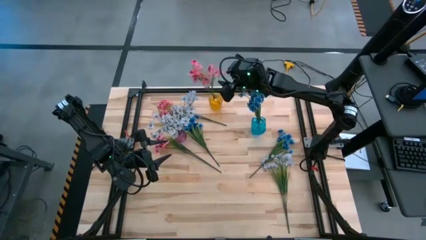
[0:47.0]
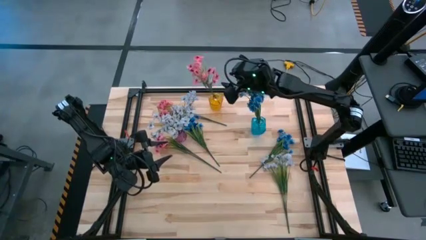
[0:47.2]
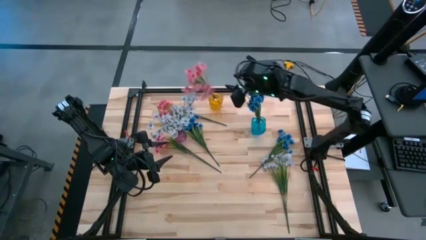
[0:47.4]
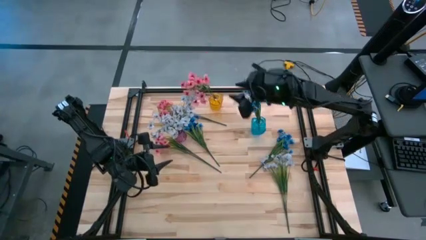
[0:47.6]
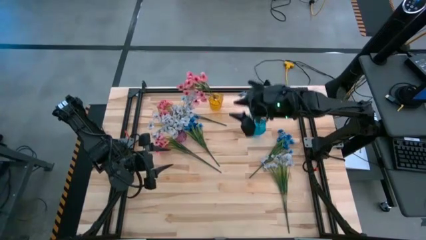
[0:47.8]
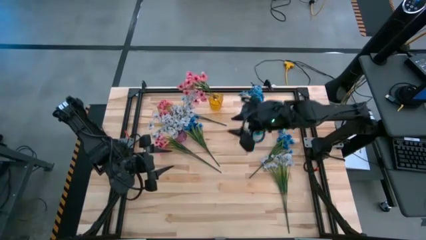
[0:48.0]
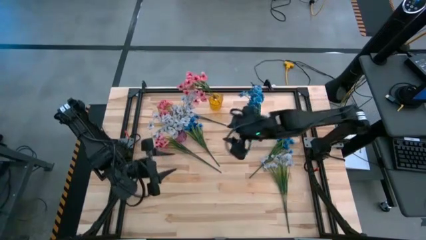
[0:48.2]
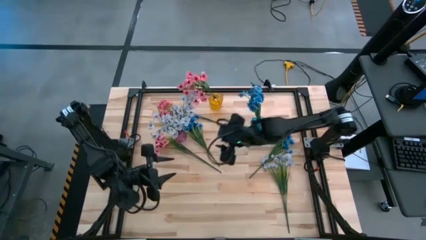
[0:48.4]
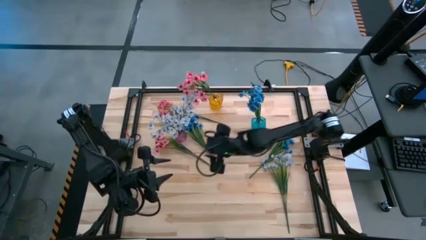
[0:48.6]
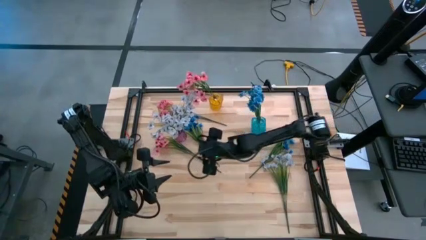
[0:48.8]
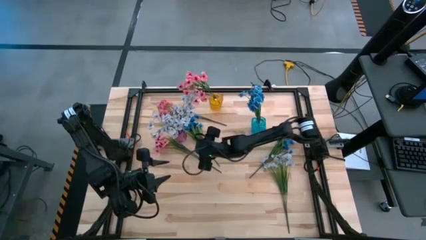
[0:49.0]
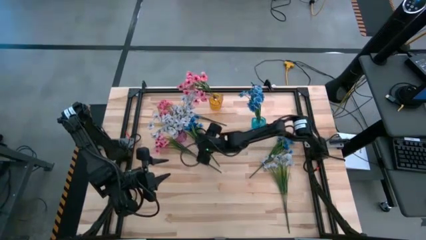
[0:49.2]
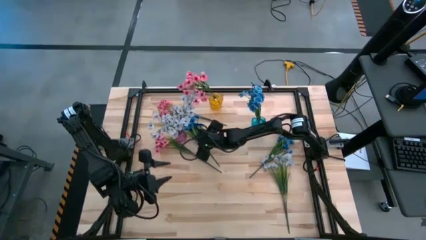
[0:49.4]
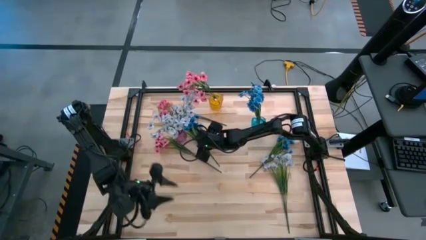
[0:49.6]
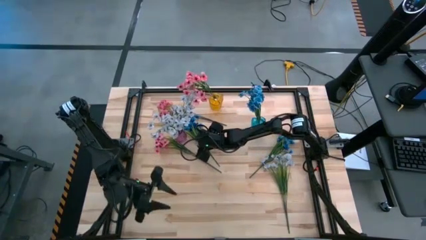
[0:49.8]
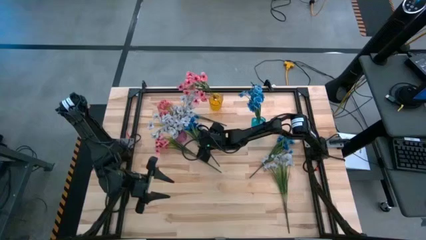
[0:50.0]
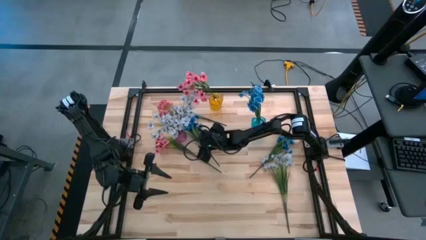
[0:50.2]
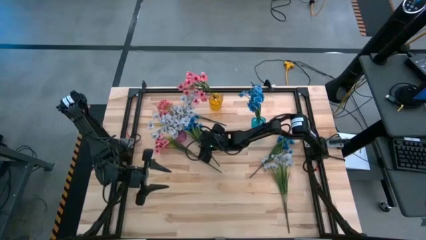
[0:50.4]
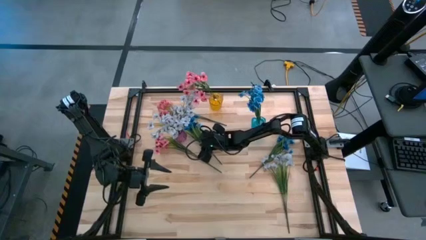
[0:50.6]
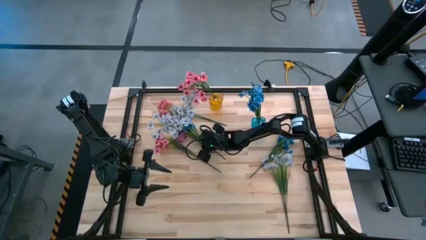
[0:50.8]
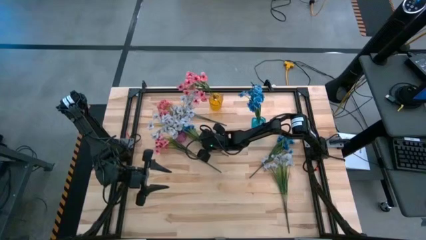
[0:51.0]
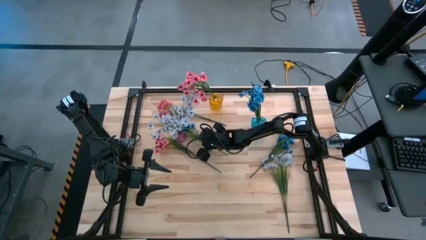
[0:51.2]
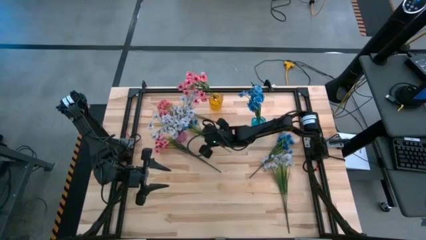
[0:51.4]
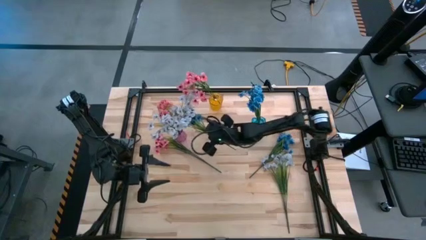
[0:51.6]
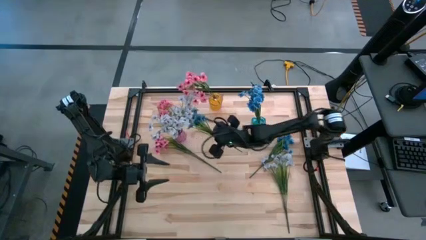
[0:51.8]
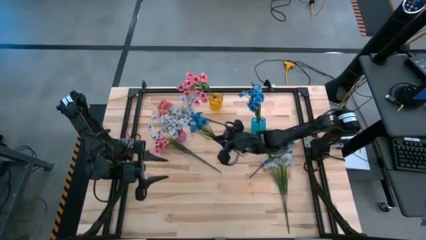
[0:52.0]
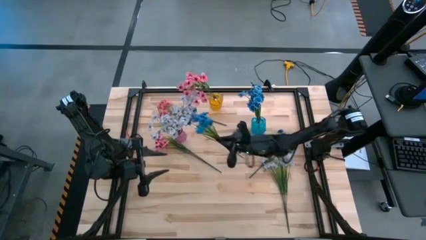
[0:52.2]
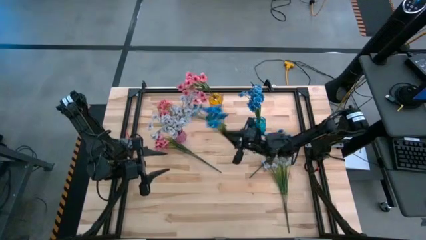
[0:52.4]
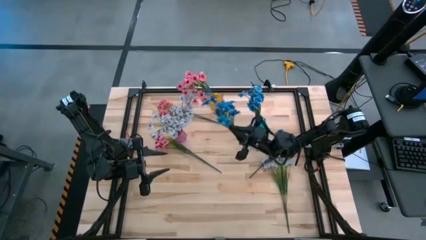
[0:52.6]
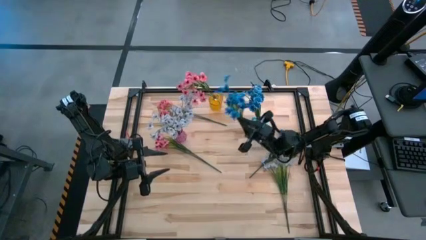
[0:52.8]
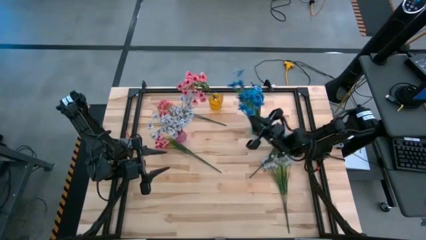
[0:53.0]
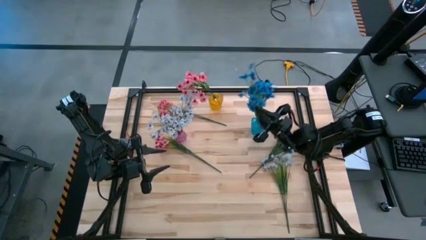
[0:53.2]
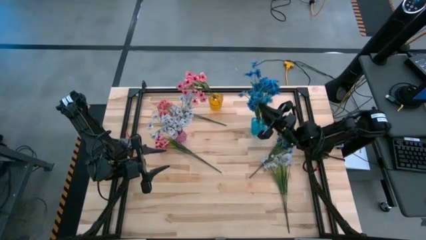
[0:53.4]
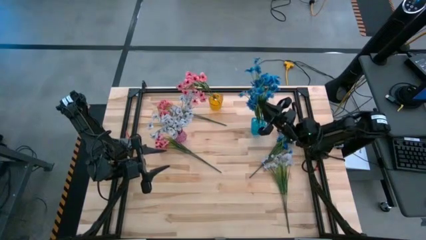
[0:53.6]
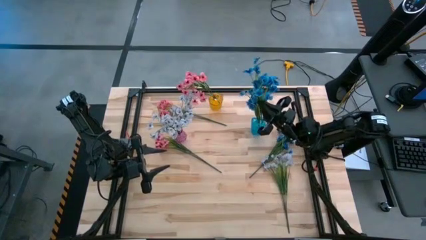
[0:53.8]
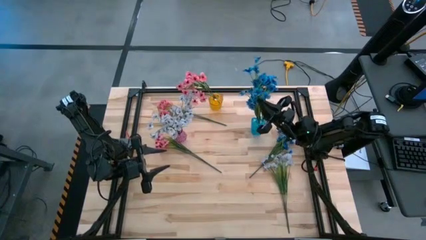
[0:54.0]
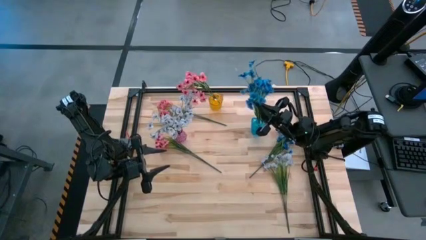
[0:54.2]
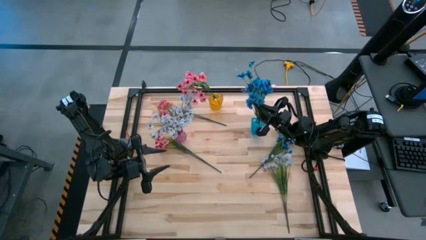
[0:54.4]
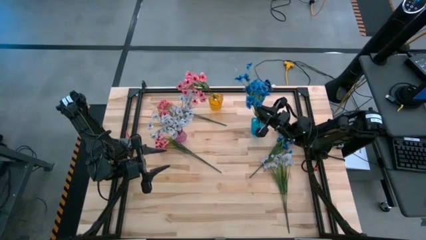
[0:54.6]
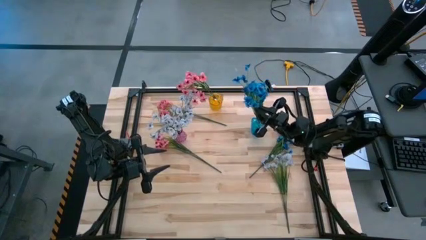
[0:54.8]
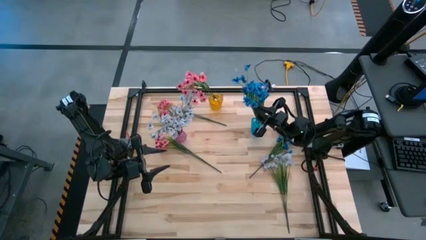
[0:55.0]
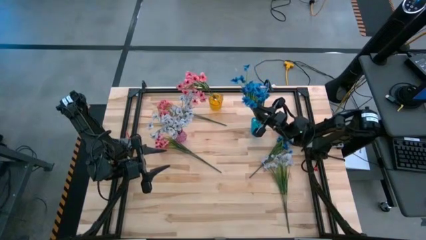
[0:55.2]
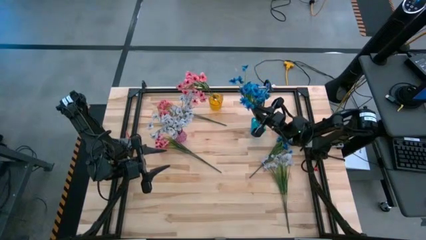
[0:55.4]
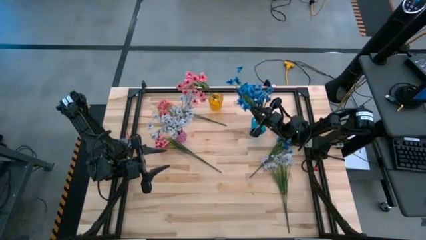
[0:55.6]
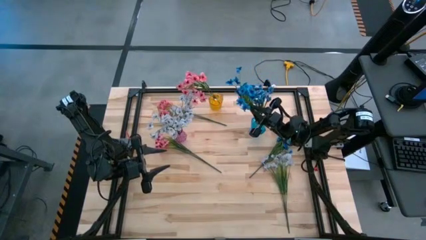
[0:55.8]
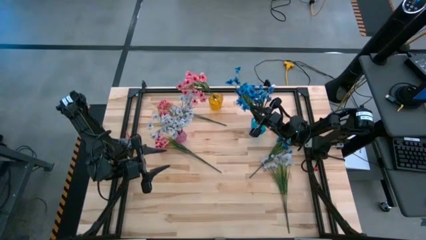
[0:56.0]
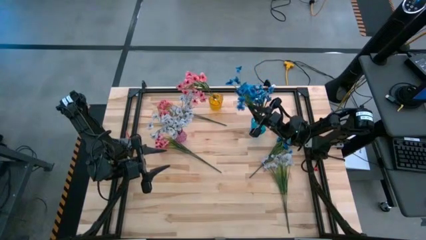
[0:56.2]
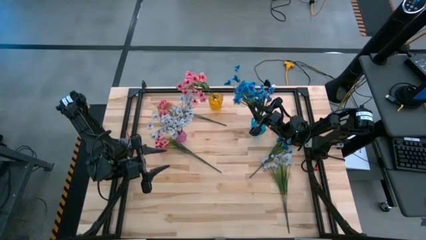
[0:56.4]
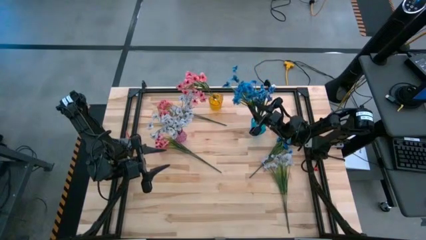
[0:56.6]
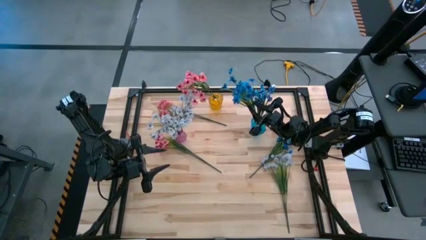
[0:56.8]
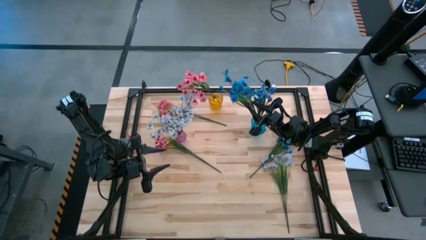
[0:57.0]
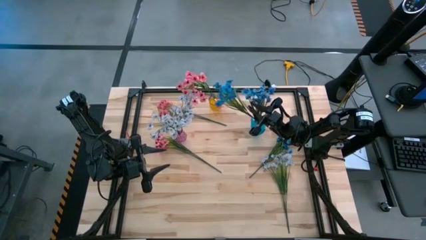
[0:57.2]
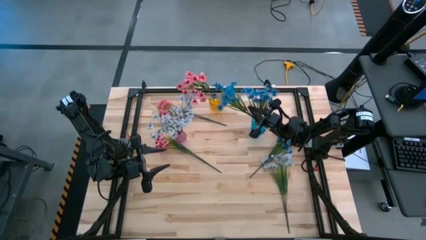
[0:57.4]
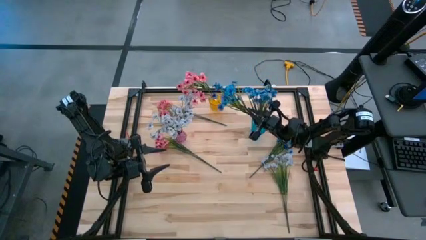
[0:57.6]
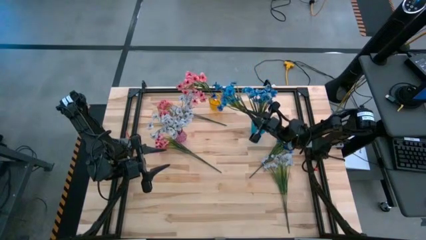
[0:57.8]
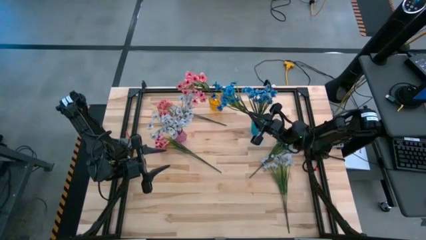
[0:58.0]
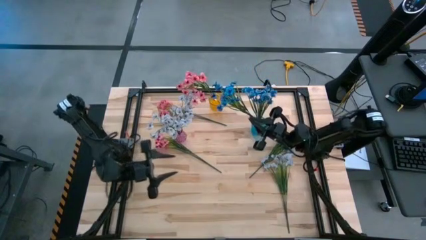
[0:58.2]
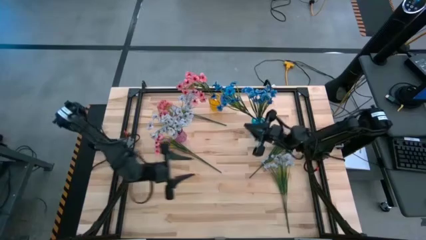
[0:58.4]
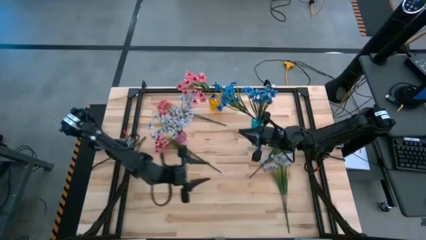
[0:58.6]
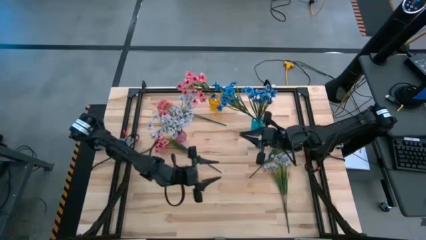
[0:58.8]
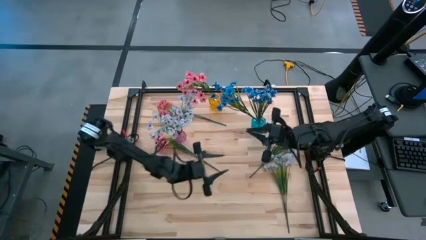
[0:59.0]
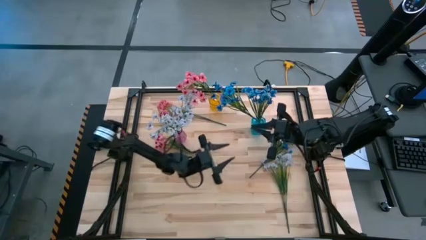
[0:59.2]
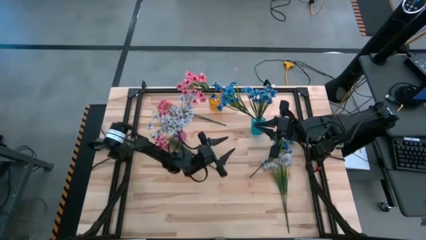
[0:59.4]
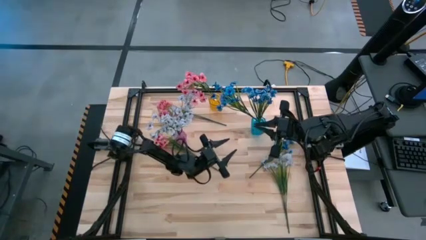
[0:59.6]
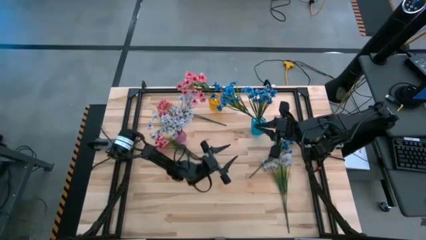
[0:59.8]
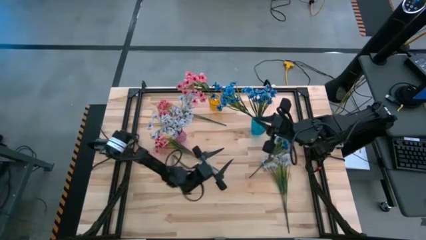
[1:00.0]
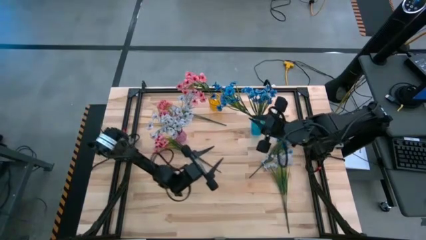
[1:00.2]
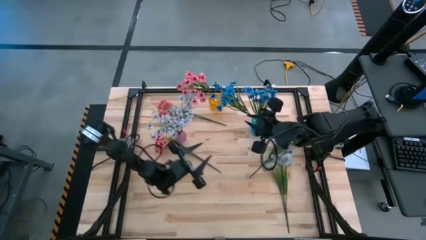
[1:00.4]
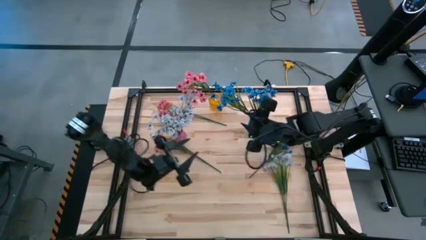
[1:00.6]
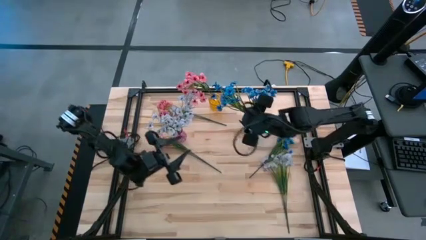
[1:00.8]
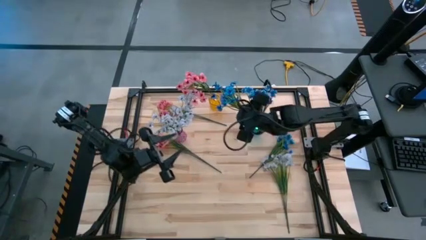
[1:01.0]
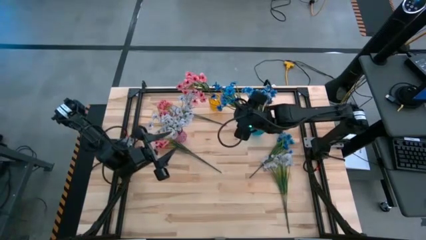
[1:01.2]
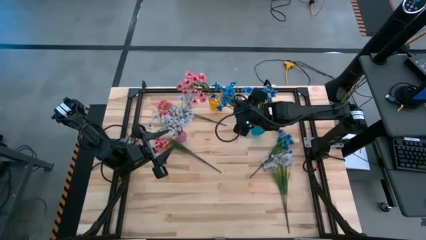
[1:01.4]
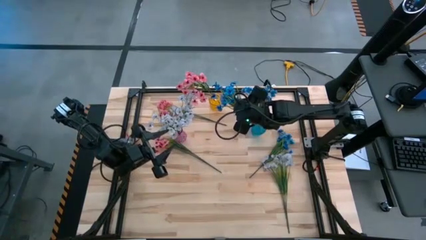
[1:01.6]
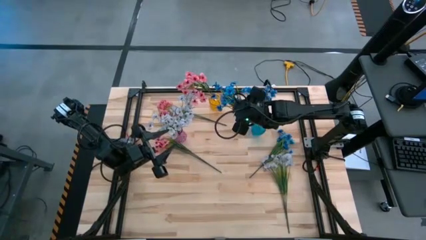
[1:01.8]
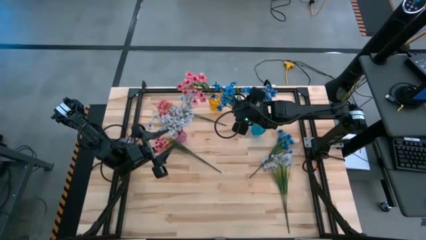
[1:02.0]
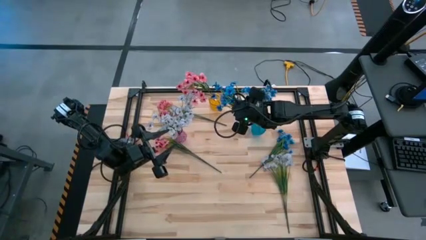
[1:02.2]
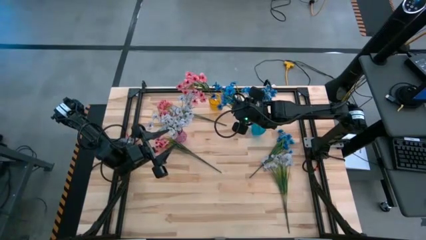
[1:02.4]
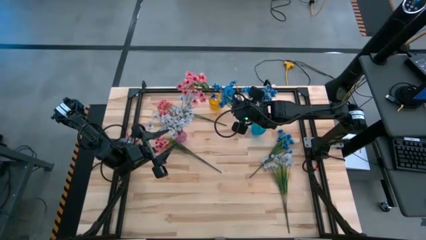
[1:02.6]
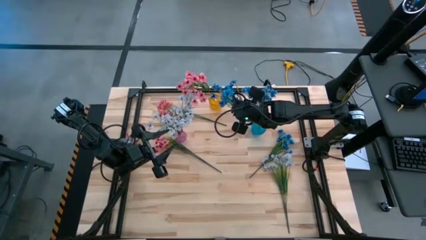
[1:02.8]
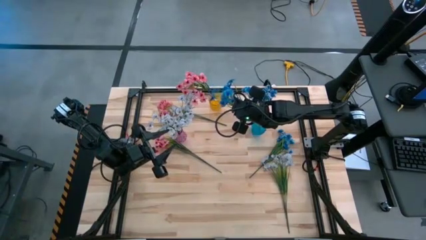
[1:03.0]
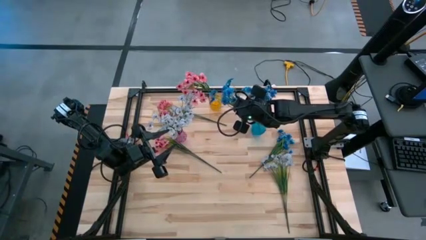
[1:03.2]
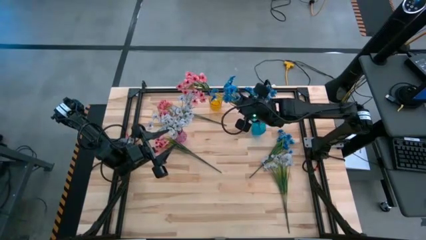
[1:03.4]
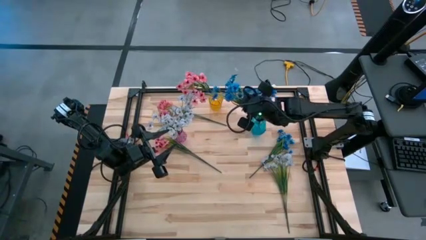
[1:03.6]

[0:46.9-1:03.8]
Task: Sort flowers into vase by color
Put the left blue flowers into the blue vase
